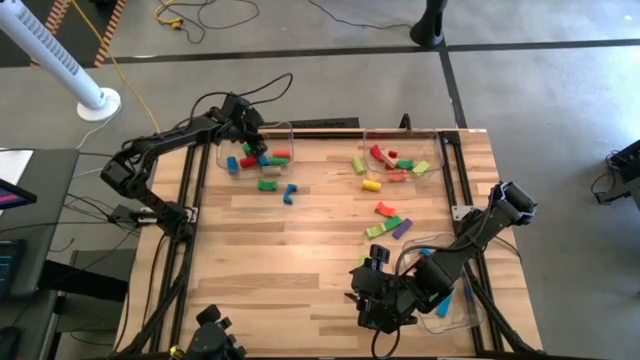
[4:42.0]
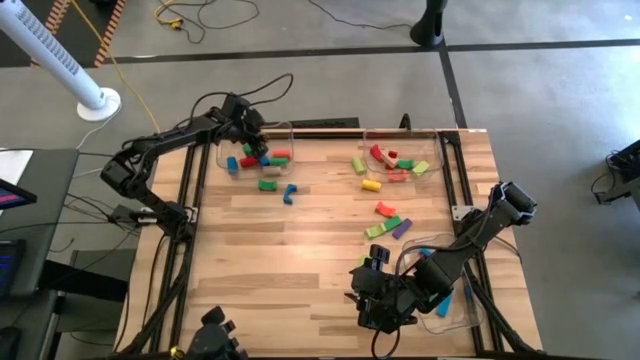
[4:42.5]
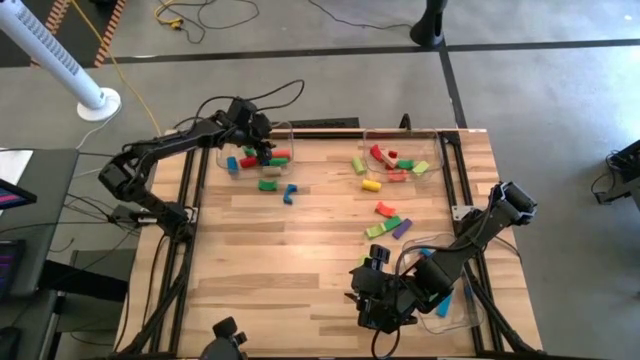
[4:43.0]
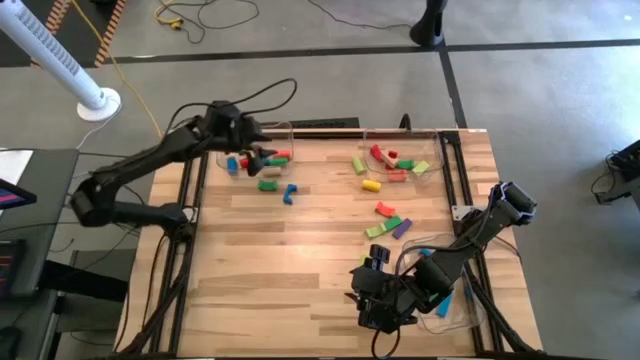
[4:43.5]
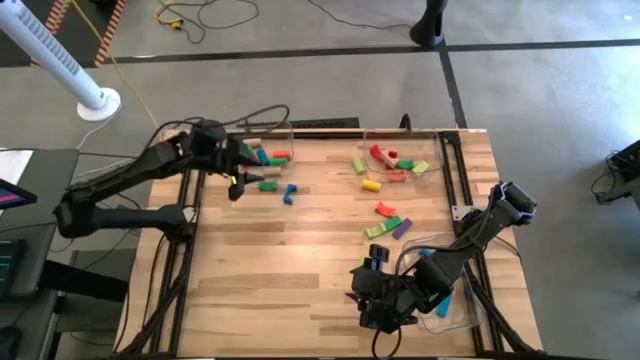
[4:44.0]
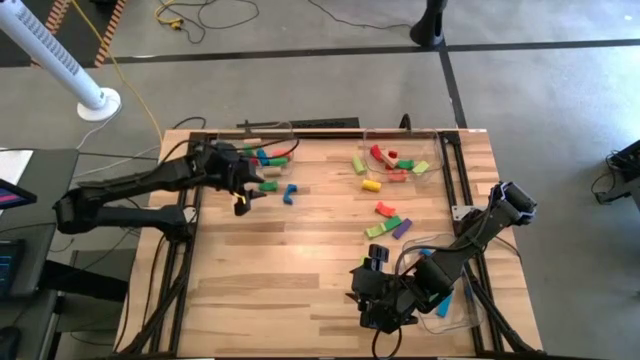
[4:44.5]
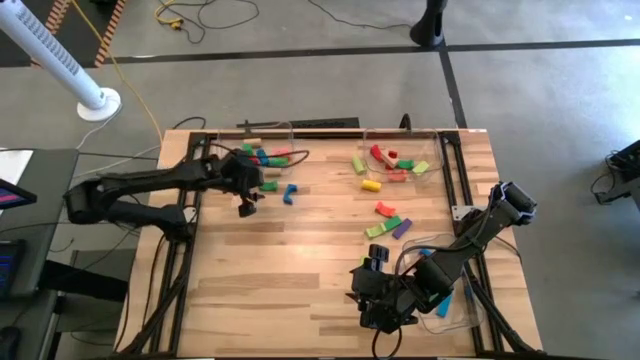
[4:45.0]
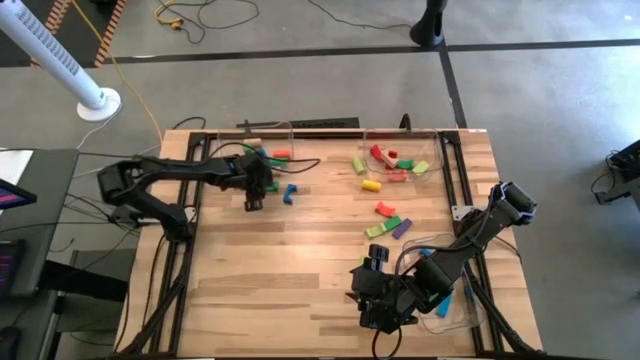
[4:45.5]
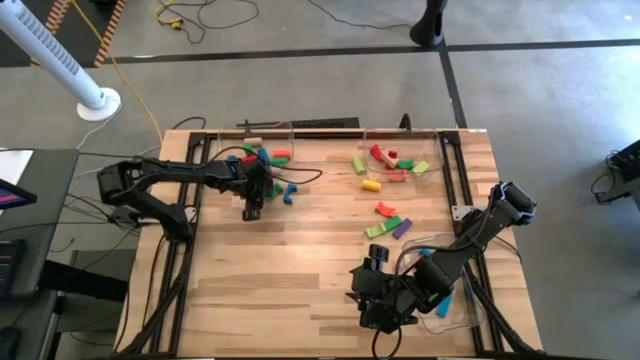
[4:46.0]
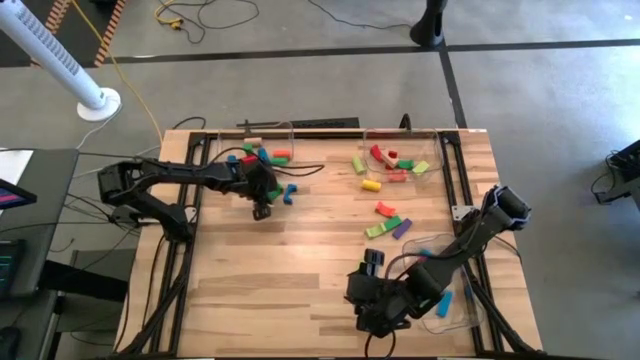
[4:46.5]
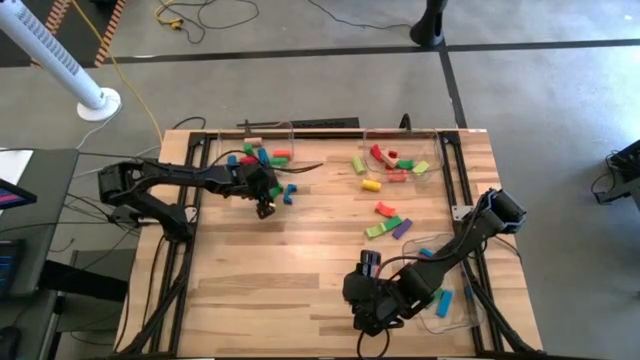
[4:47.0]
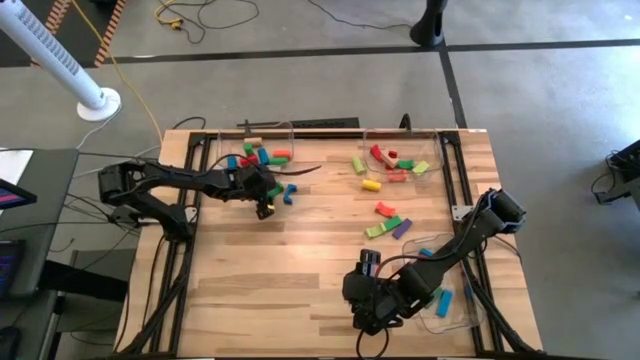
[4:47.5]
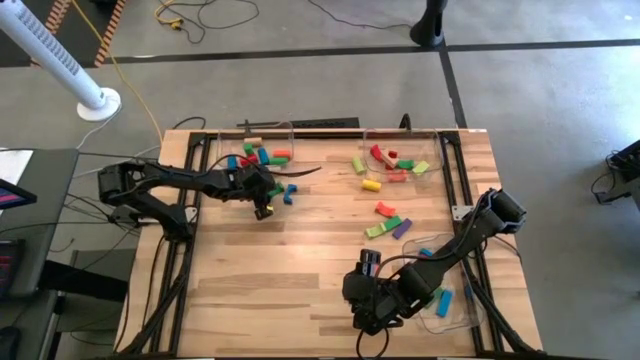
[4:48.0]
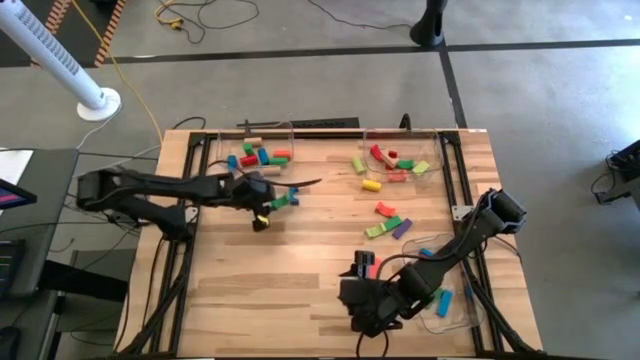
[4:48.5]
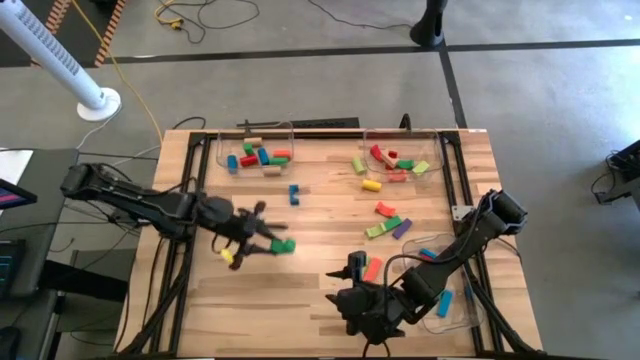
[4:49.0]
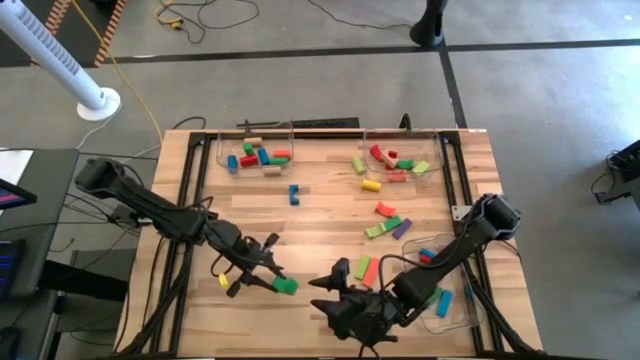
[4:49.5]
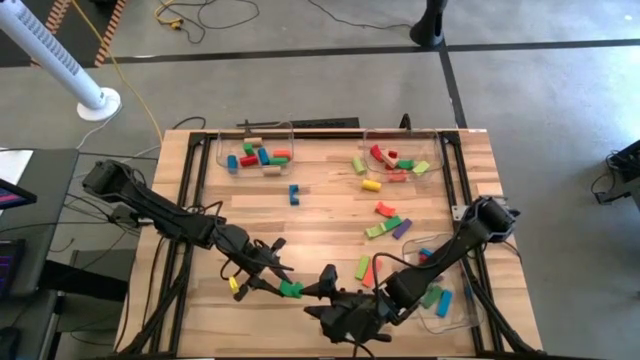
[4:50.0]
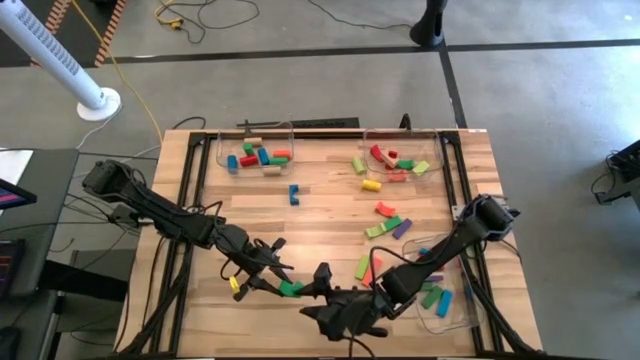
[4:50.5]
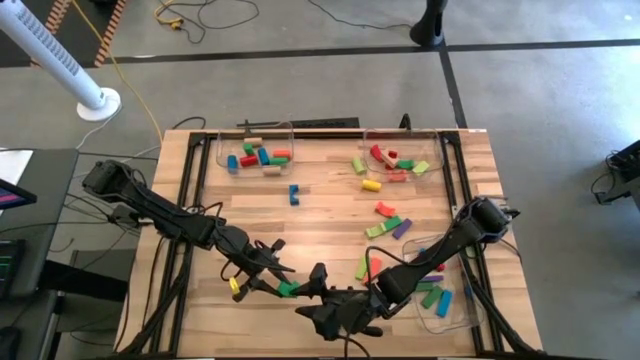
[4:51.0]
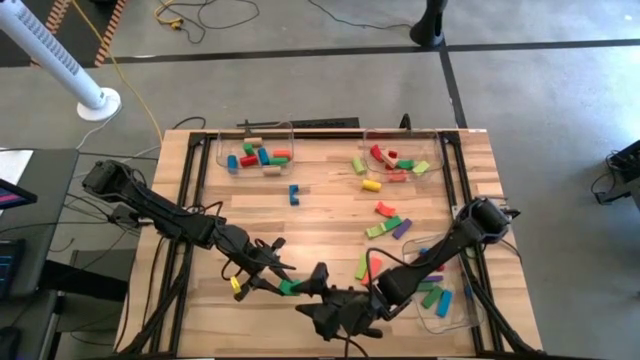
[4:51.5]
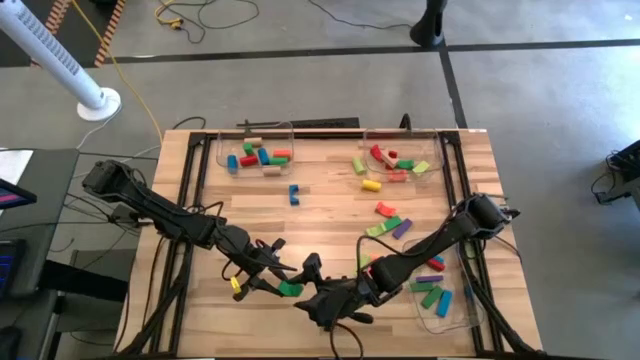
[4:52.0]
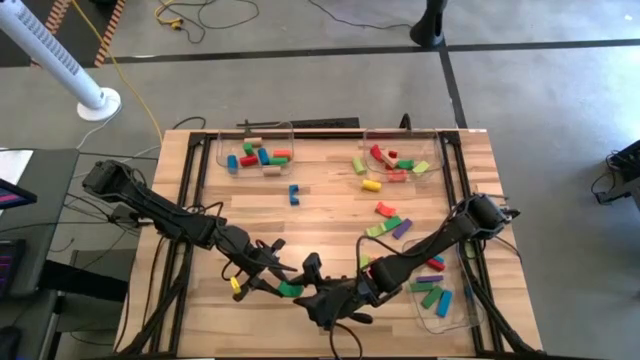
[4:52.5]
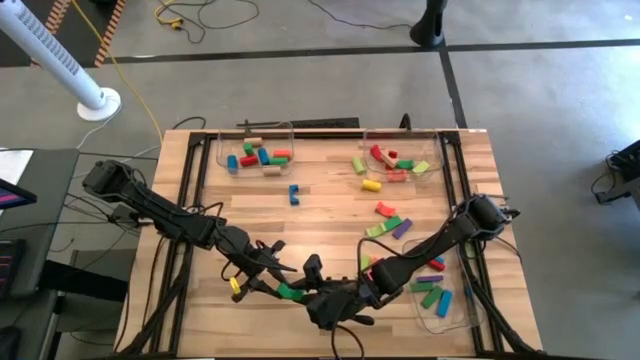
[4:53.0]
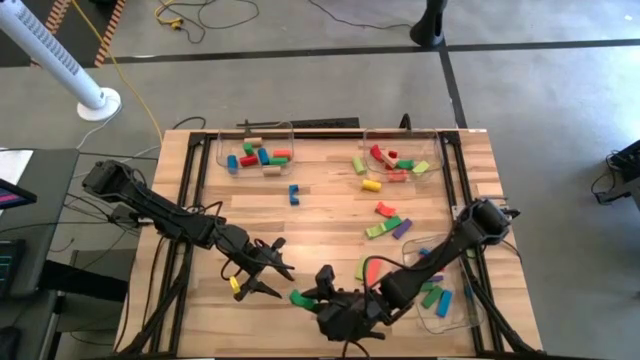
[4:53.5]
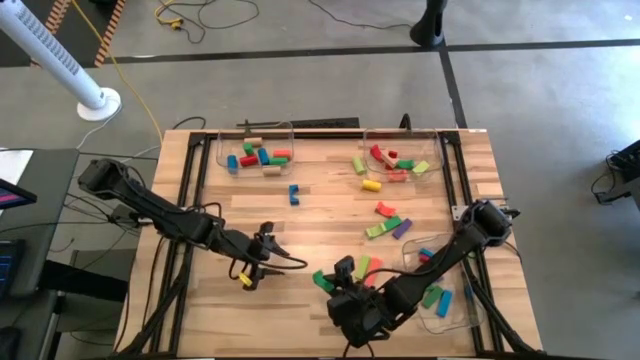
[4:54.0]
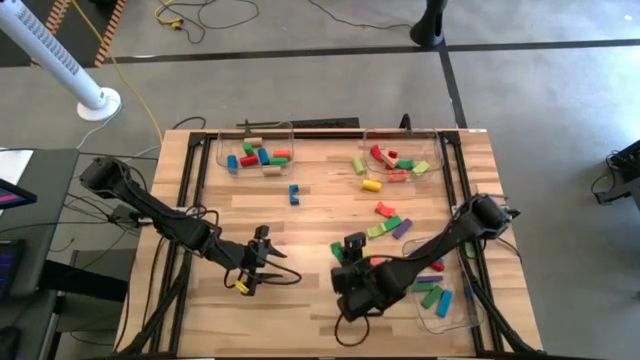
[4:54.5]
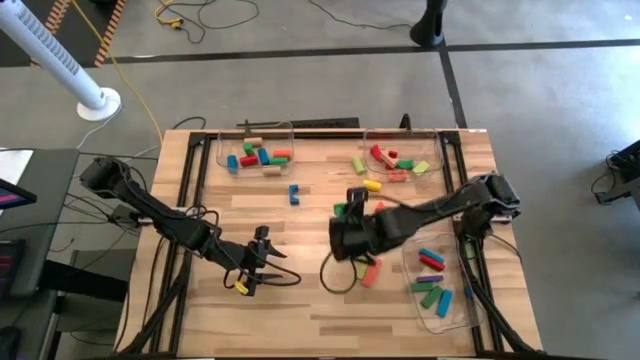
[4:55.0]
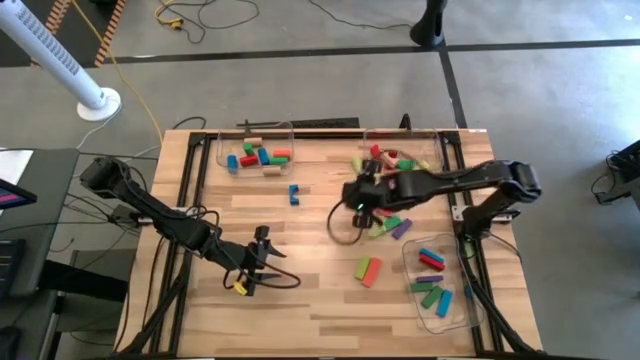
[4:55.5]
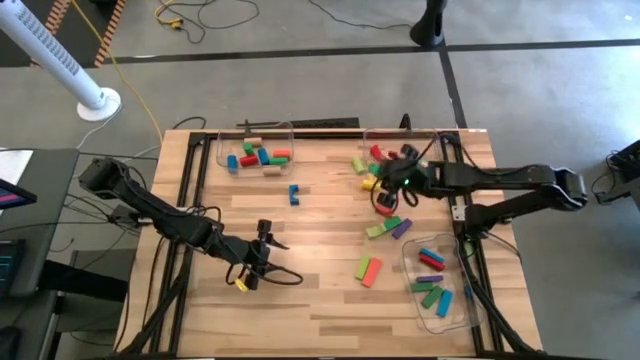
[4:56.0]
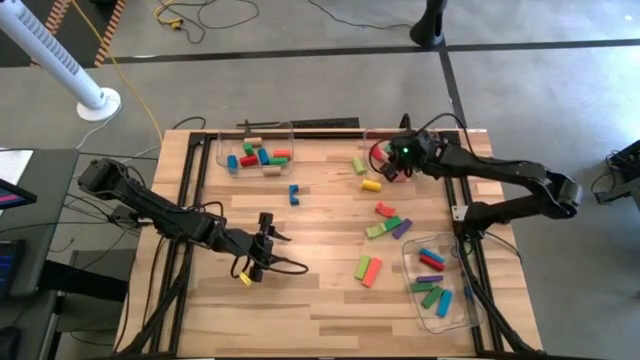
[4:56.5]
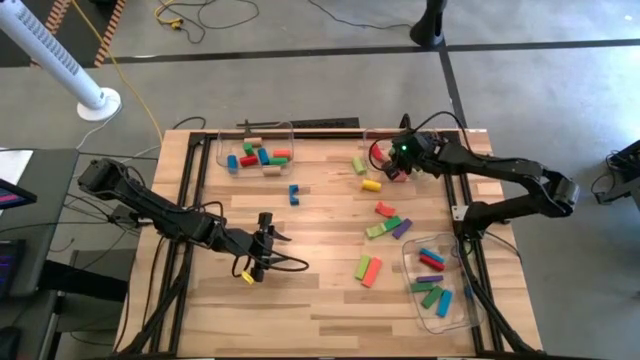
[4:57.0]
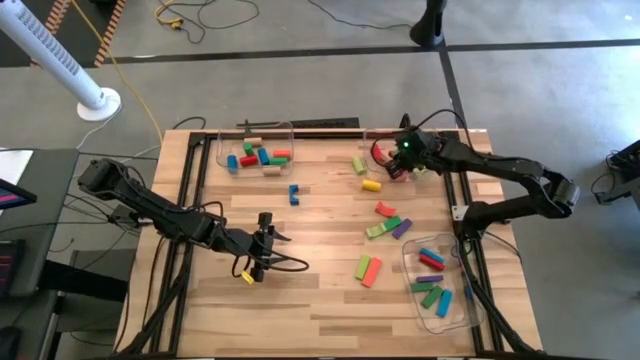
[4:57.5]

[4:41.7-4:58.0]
Task: Sort blocks by size
Put the green arch block into the top right transparent bin

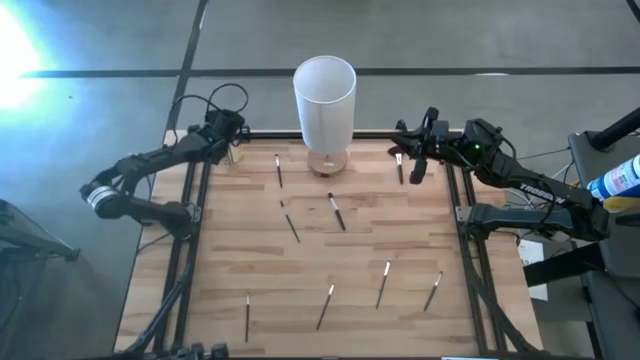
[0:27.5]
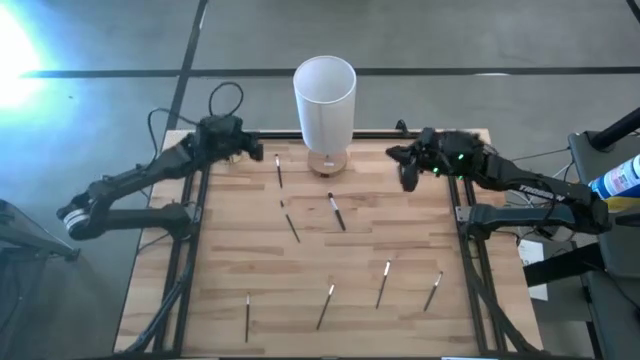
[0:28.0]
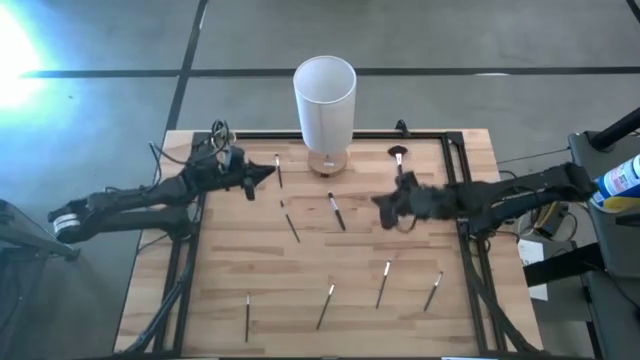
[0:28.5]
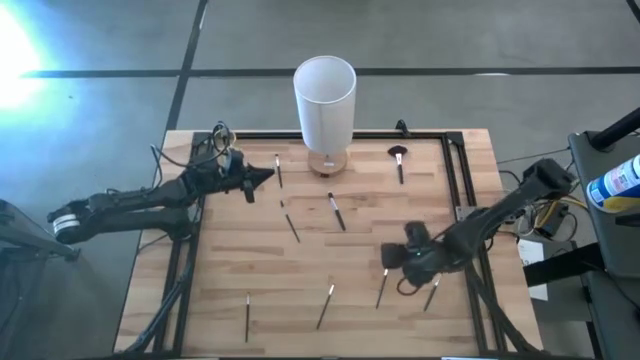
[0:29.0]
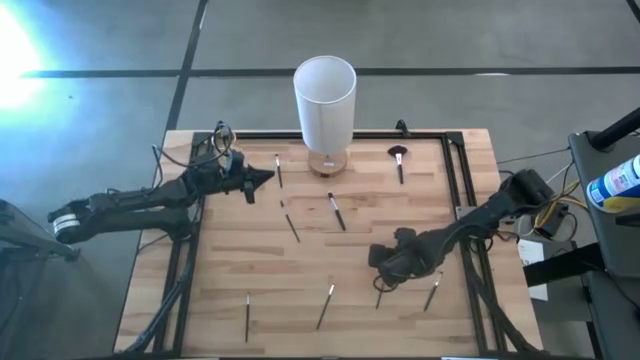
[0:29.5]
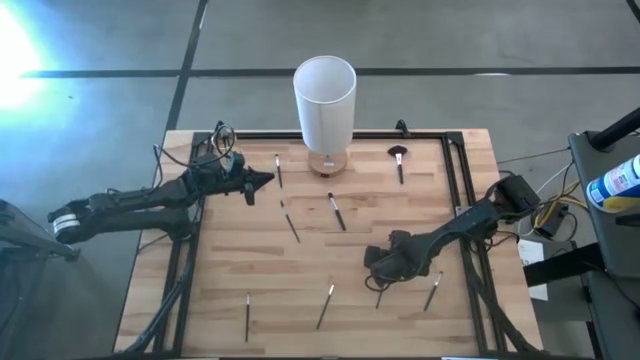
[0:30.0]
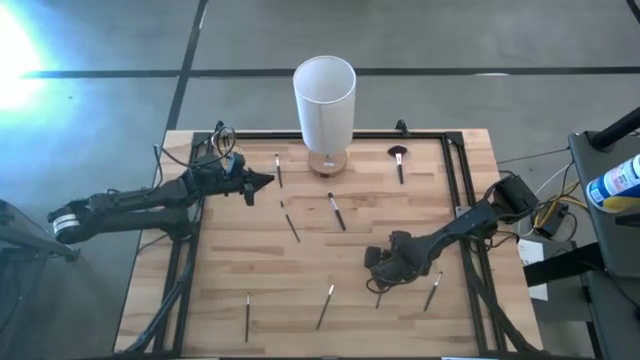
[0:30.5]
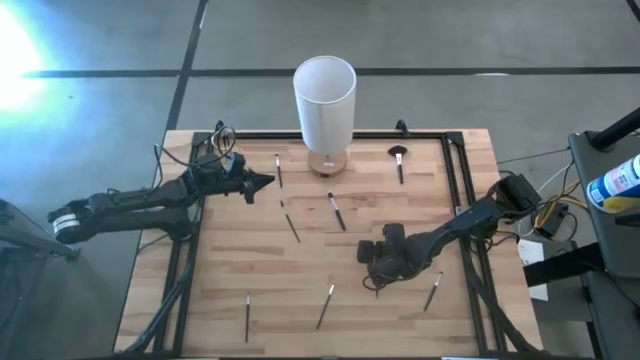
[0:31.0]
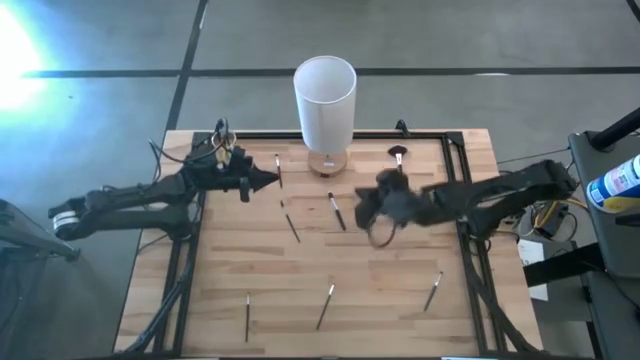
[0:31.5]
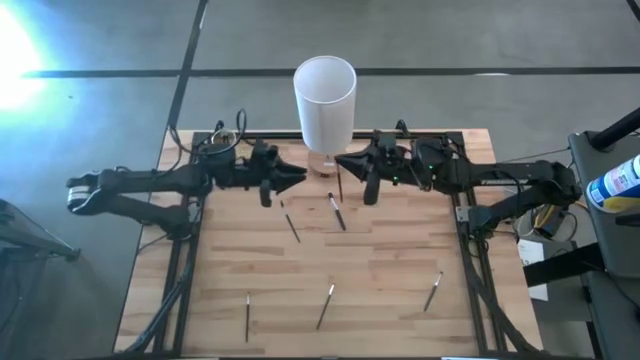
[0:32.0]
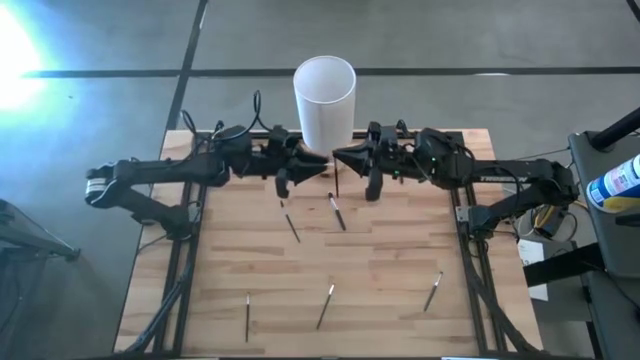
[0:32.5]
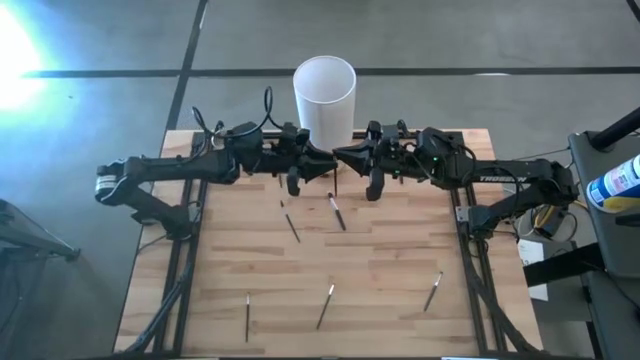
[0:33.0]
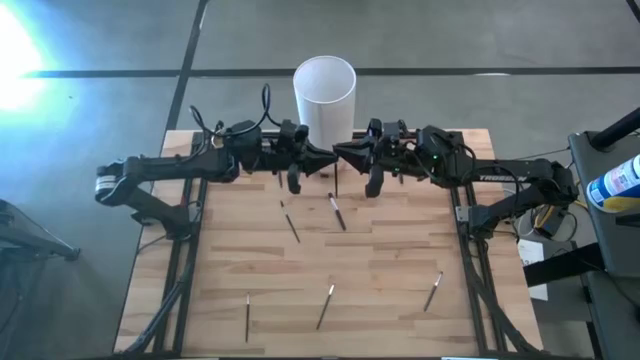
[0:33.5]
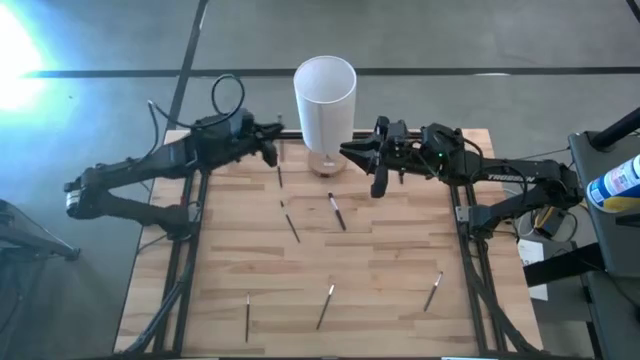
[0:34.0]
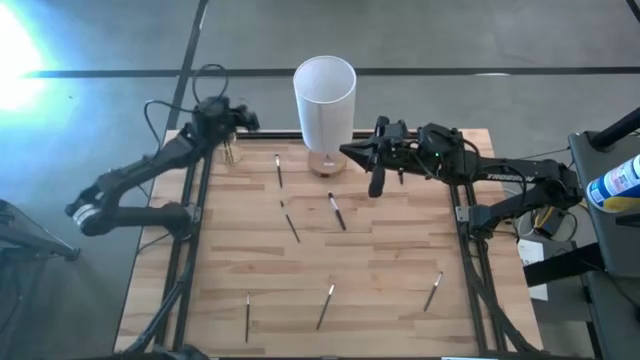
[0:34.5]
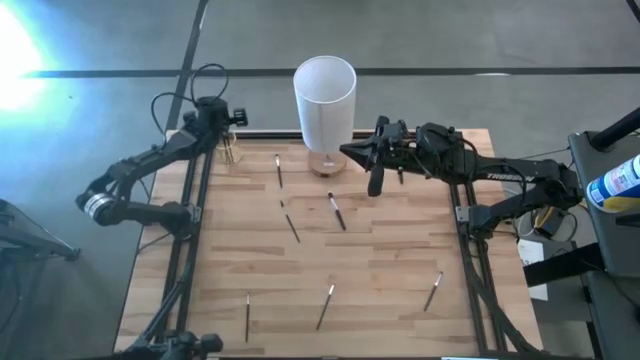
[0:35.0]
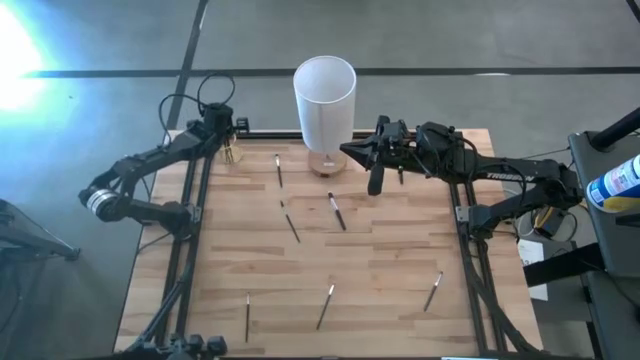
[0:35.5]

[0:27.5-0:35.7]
Task: Pick & Place Makeup Brushes
Put the eyeshadow brush into the makeup holder
